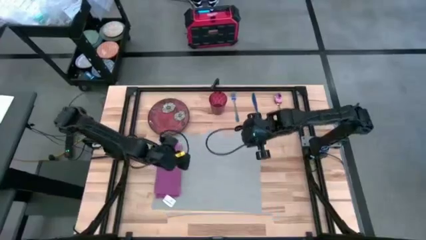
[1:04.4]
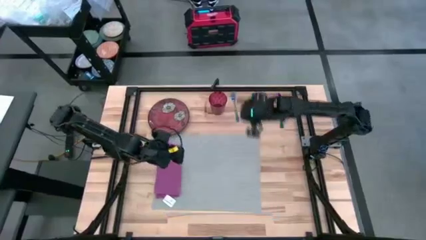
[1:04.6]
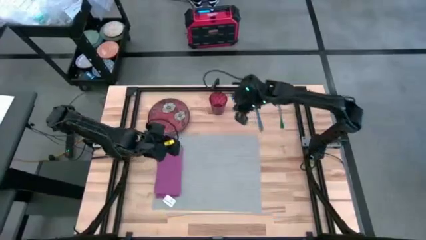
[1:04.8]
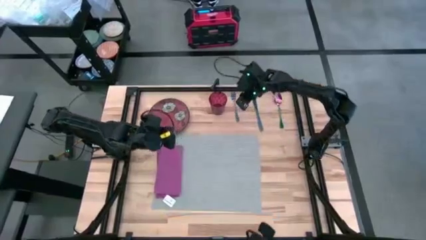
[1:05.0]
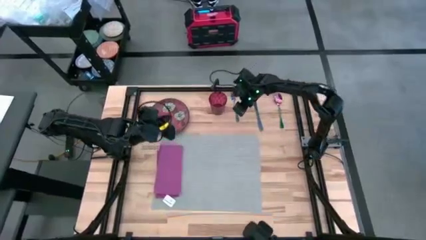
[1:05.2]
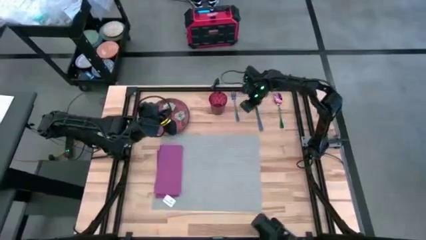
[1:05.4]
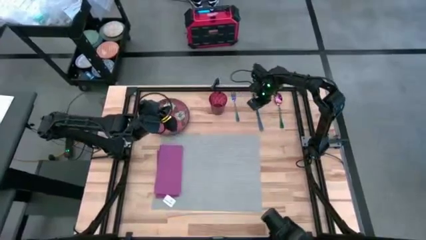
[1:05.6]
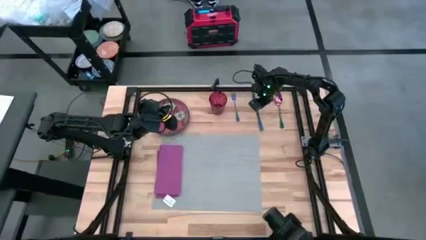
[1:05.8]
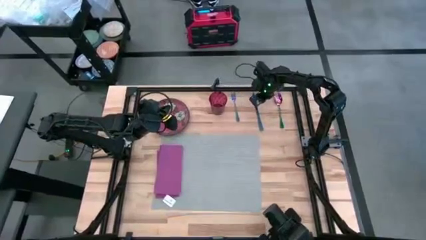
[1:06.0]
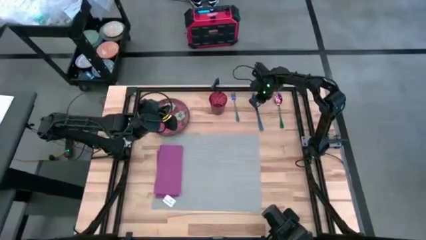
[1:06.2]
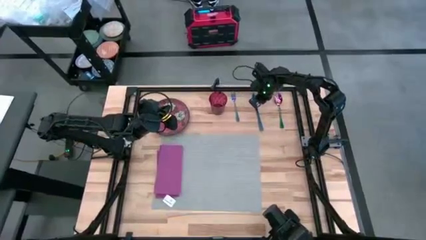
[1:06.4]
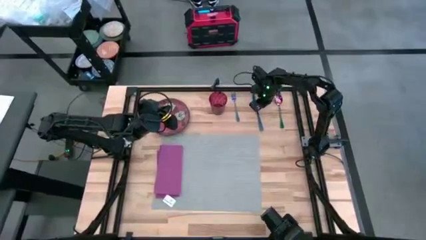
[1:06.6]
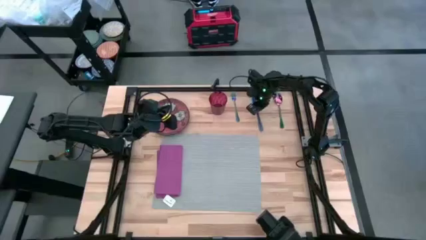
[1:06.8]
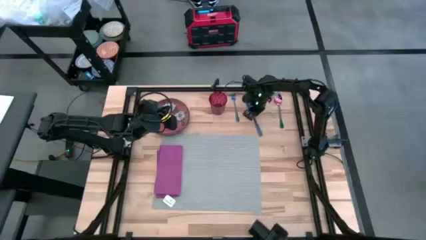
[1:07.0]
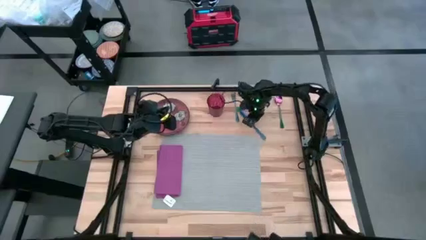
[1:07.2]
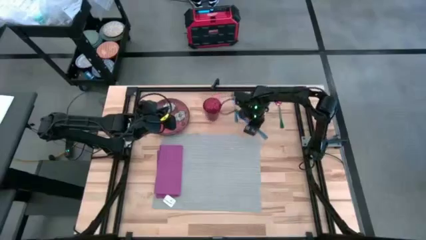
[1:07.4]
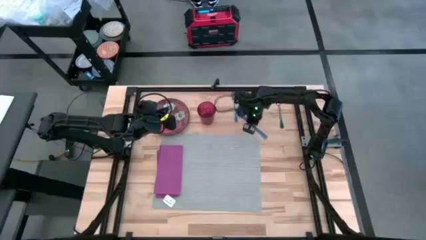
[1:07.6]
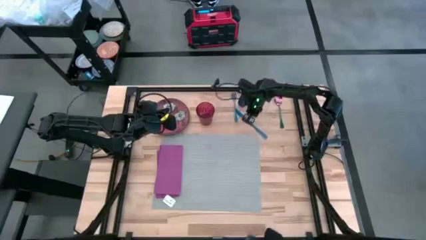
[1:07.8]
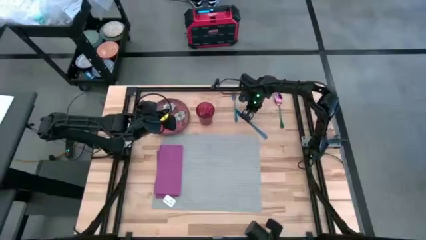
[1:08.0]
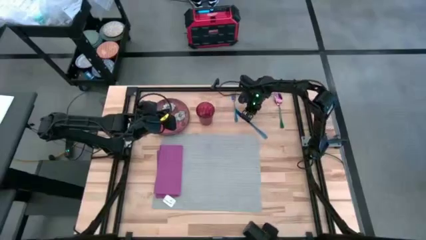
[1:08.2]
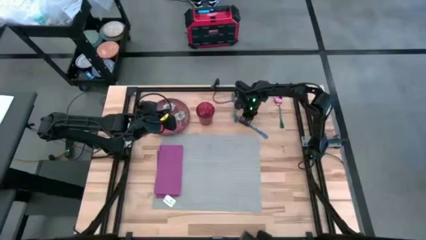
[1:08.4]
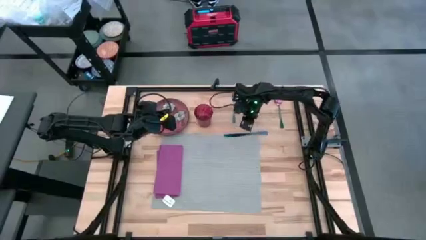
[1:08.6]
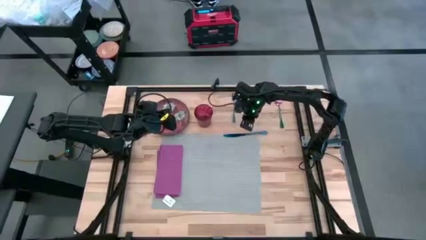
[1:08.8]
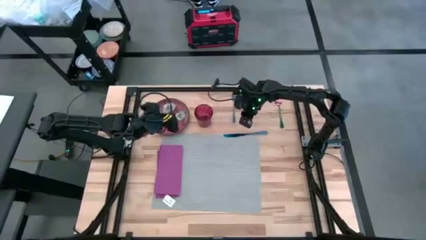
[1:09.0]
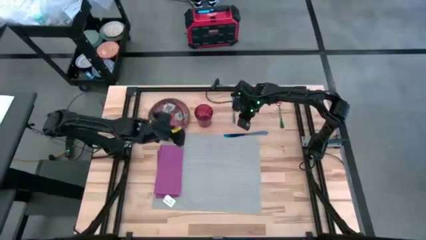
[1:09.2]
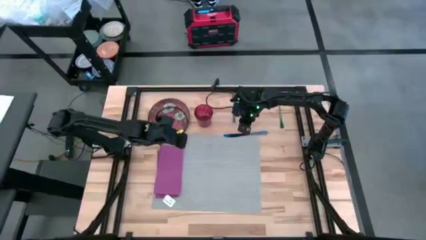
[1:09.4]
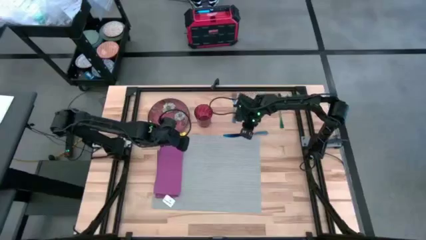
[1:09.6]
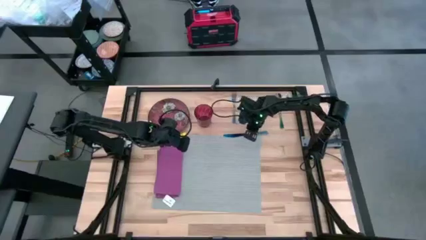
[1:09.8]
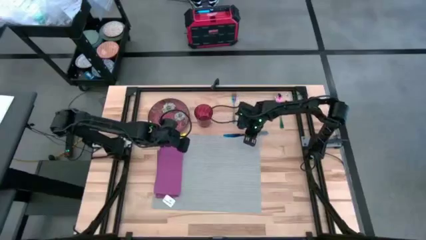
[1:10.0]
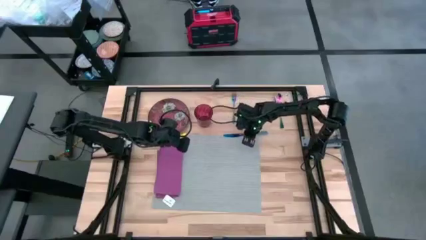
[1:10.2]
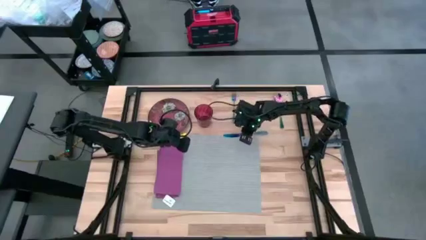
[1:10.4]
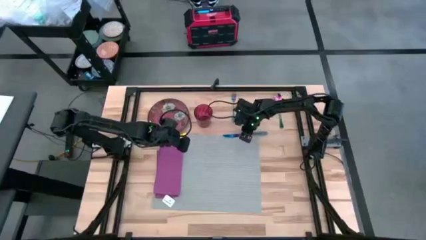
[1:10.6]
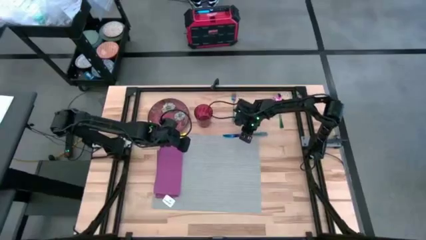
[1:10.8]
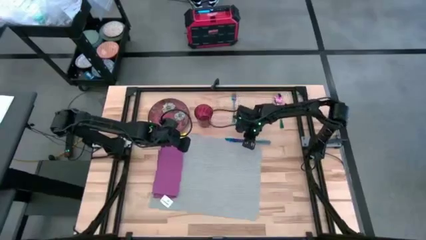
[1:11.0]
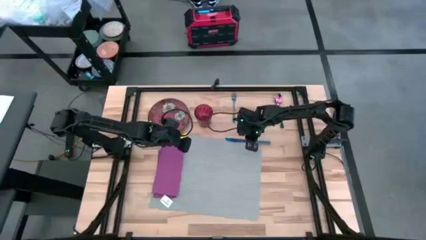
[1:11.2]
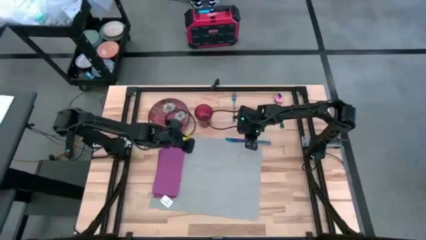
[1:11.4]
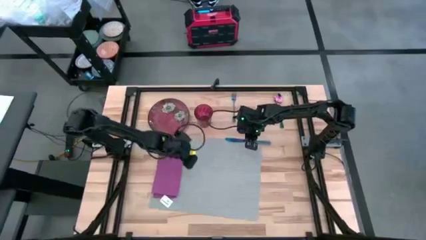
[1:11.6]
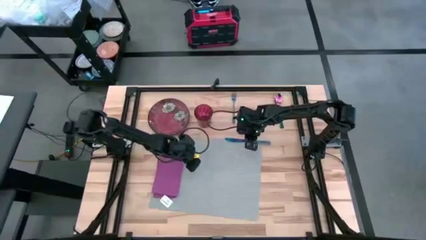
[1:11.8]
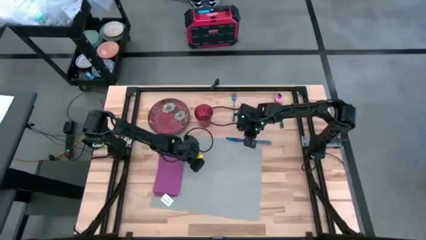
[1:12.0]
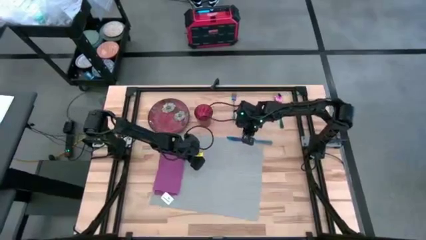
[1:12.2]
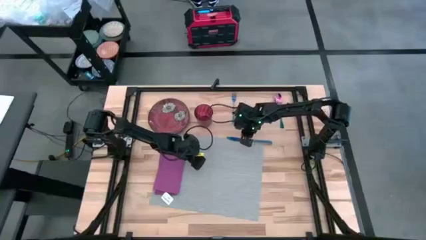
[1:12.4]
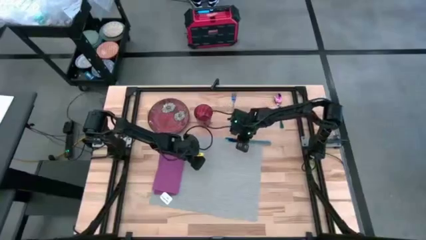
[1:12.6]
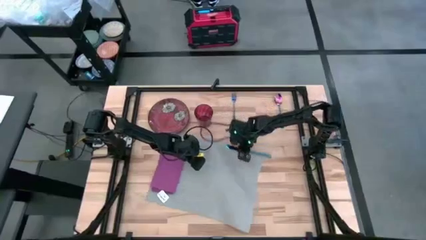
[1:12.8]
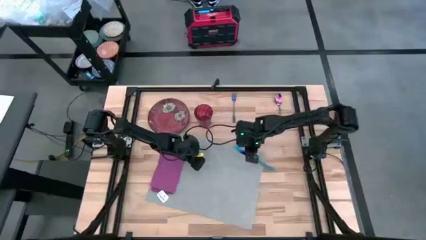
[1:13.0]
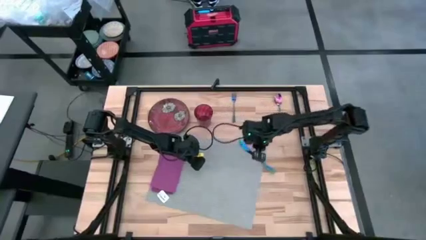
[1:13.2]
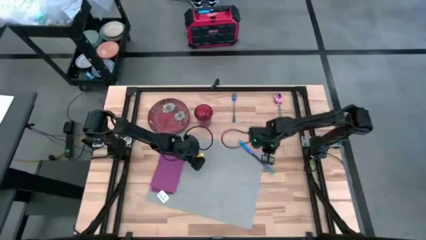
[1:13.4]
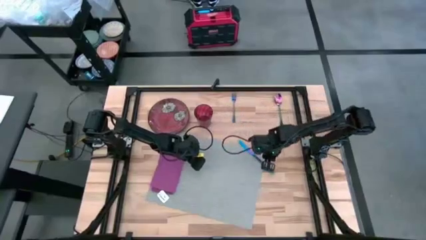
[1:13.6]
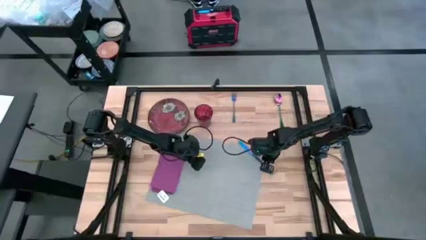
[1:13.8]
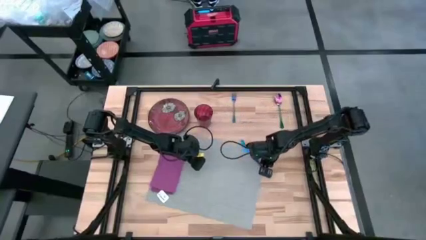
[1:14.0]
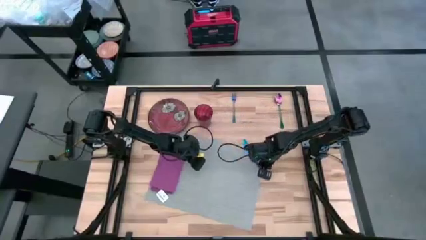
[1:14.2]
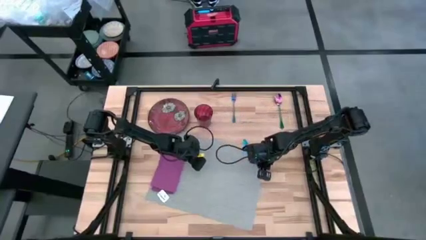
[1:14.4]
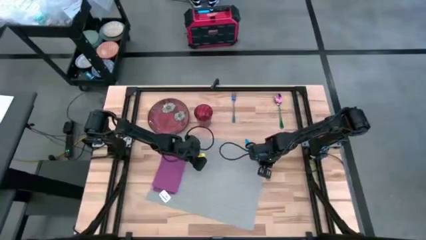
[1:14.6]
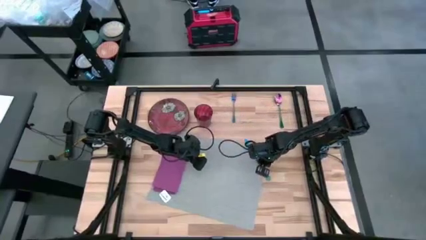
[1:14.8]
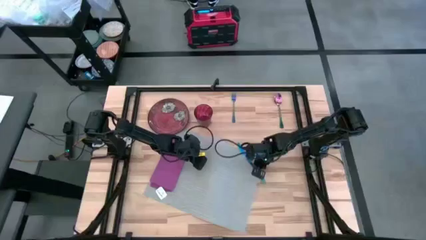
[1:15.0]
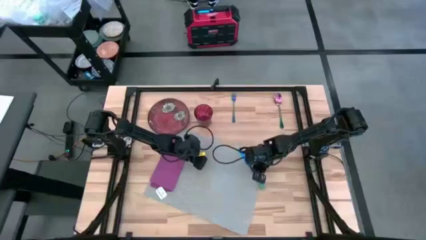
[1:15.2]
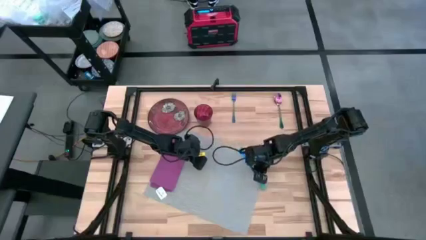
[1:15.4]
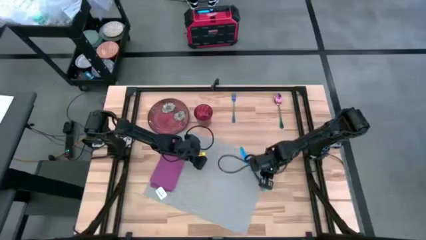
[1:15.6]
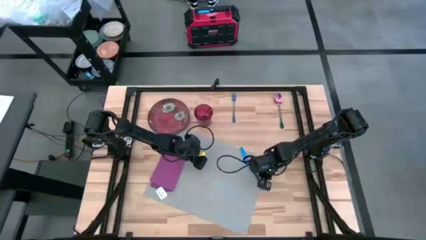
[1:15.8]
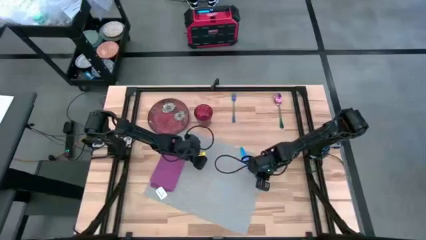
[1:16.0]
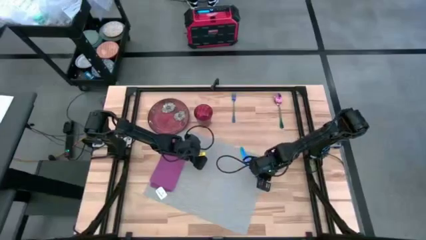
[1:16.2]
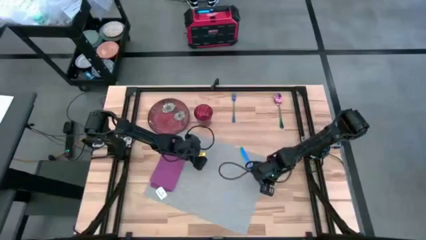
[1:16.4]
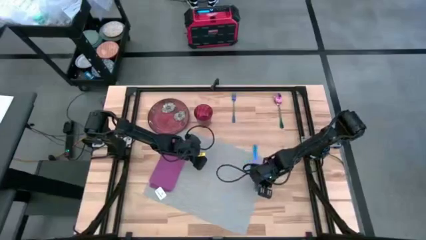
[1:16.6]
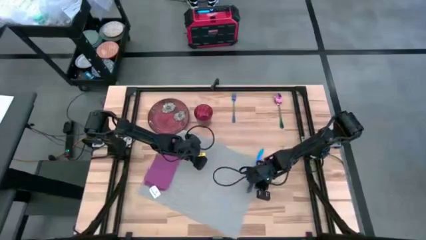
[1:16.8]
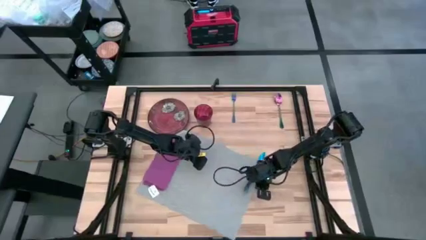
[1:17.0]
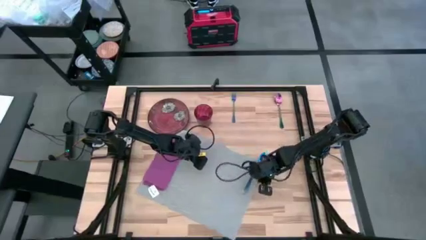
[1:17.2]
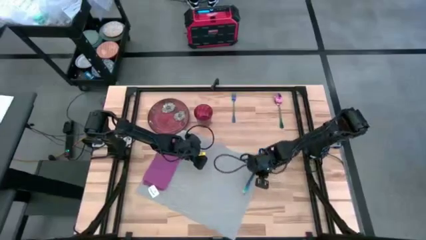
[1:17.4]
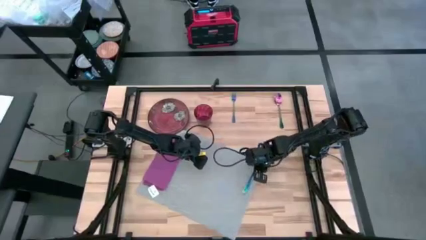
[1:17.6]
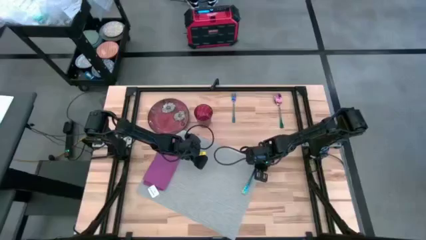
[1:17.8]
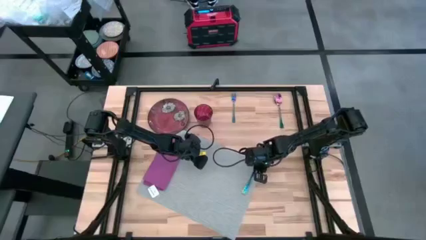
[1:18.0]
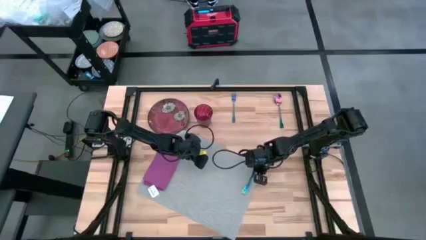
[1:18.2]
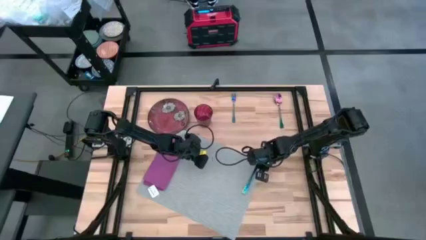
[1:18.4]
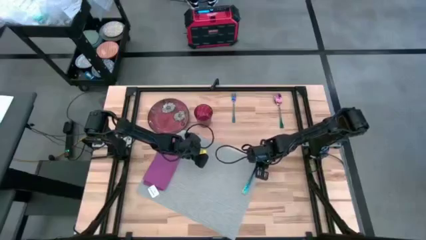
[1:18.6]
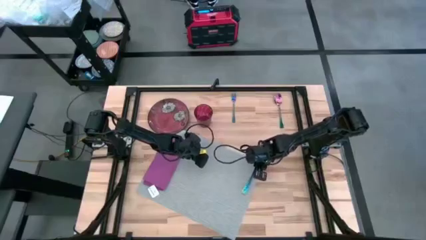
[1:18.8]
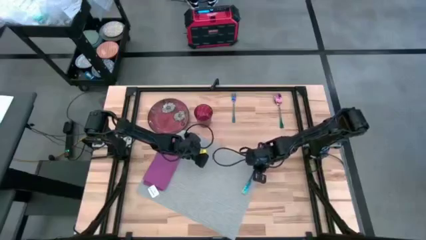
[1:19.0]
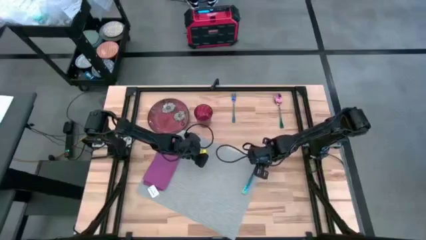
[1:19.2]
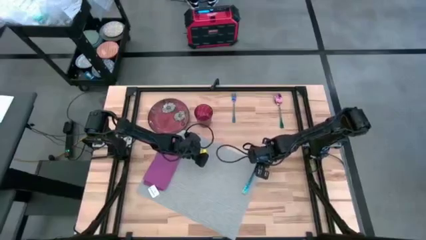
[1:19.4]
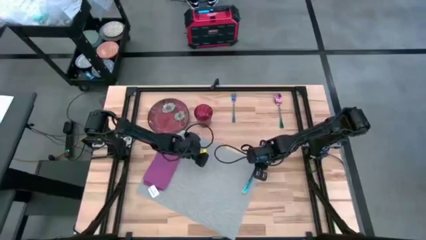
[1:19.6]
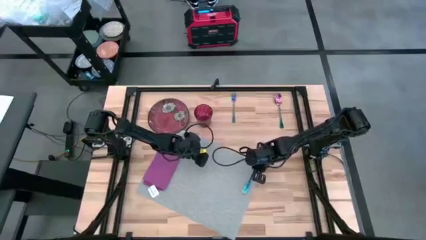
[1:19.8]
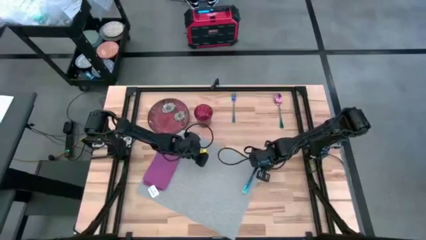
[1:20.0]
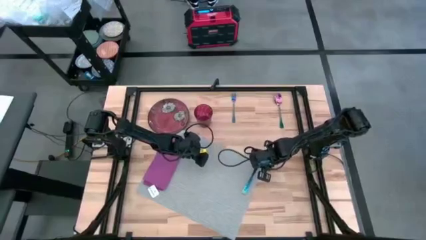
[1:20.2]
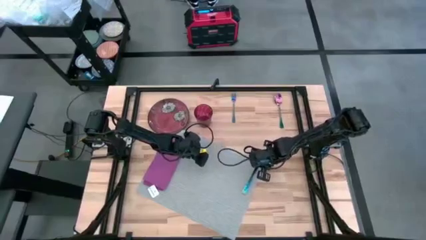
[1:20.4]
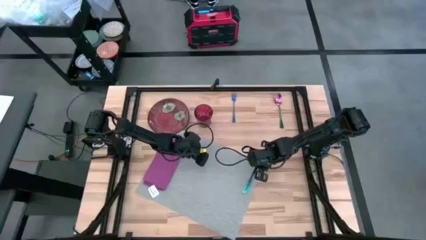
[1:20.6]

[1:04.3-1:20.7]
Task: Set table place
Put the blue knife on the middle right of the gray place mat
